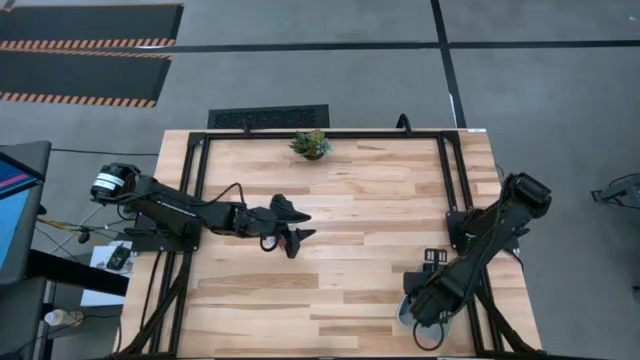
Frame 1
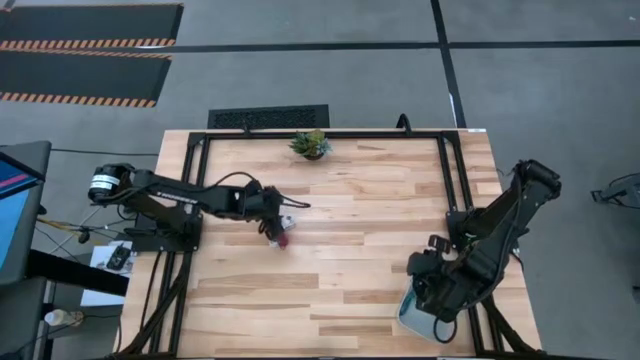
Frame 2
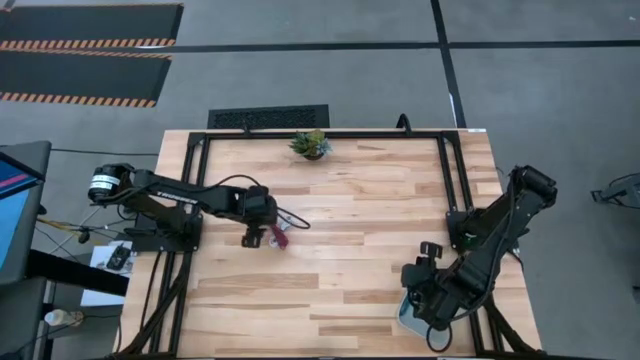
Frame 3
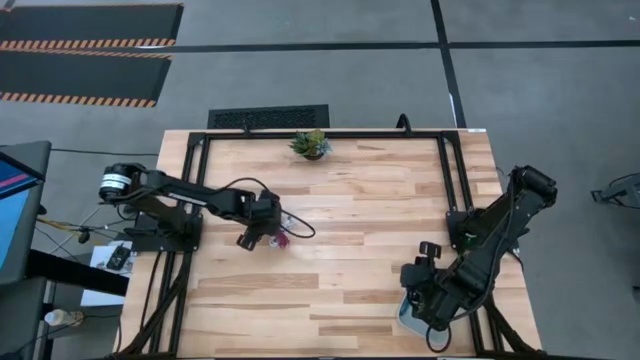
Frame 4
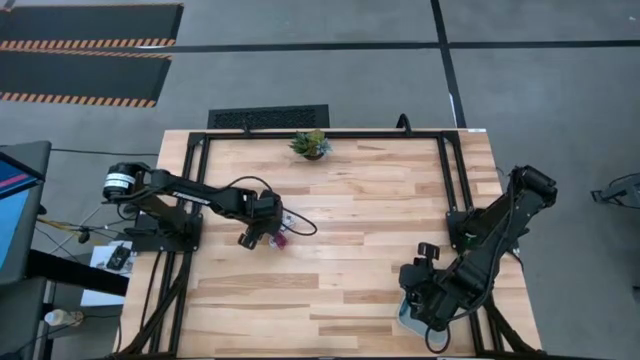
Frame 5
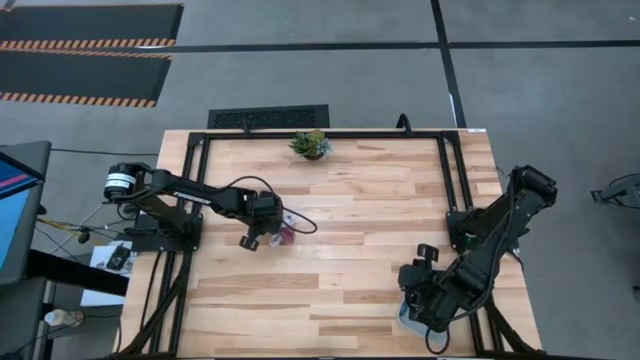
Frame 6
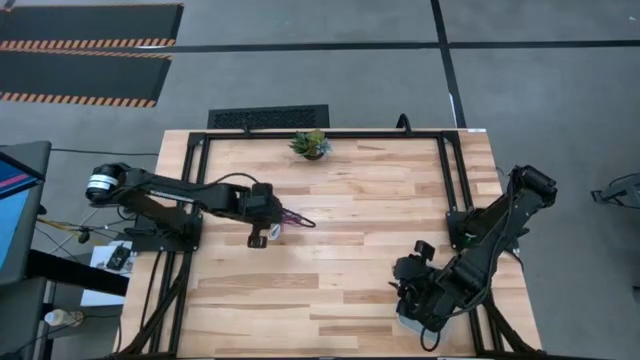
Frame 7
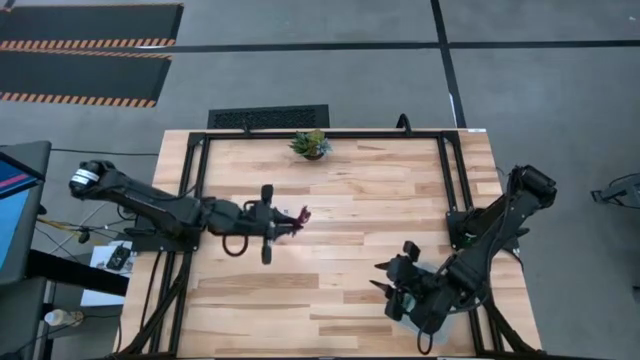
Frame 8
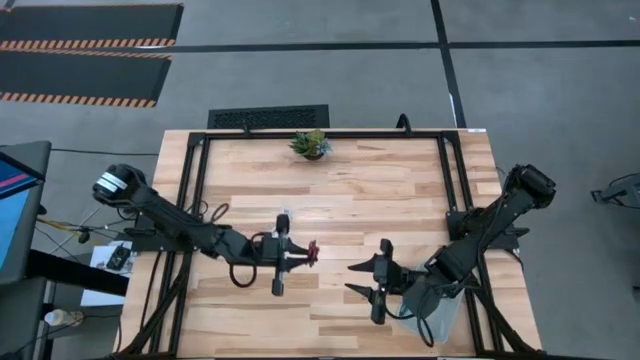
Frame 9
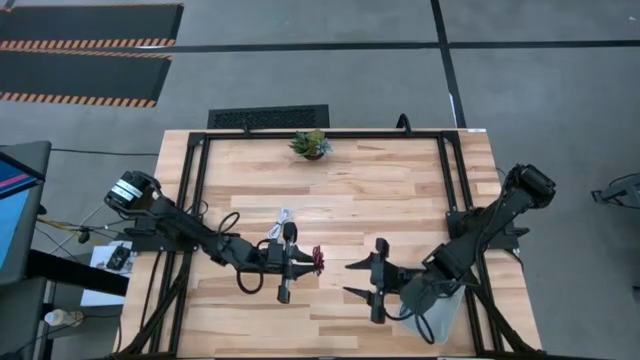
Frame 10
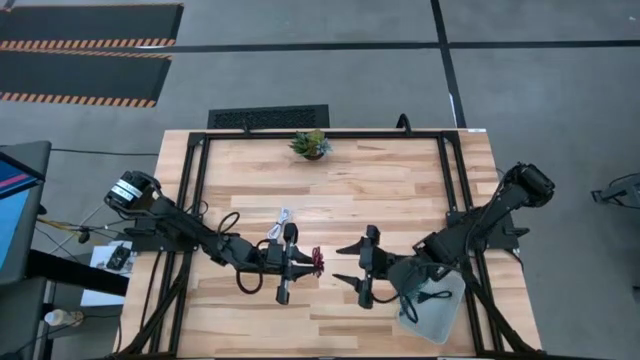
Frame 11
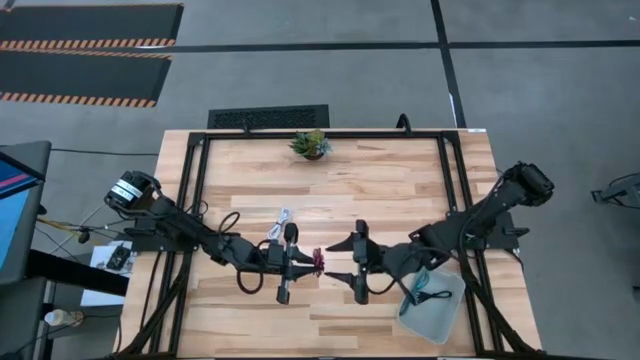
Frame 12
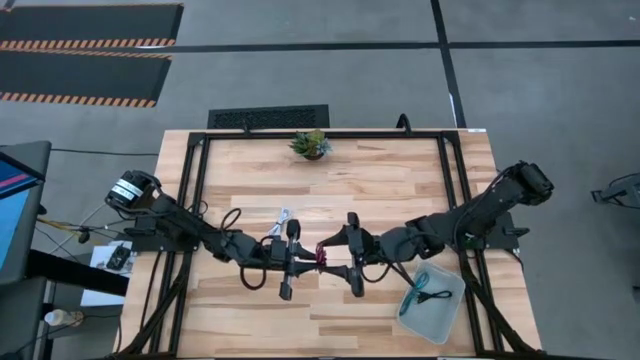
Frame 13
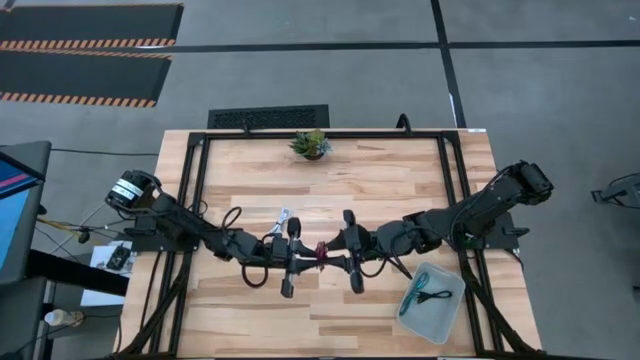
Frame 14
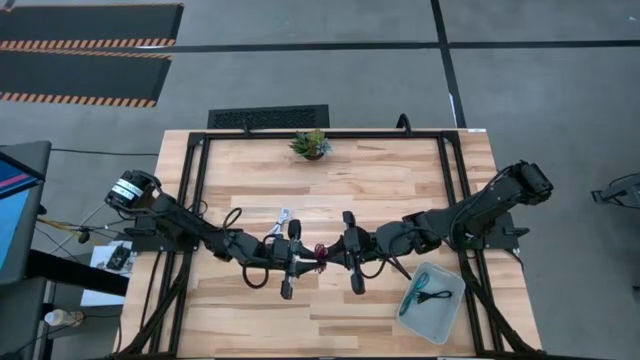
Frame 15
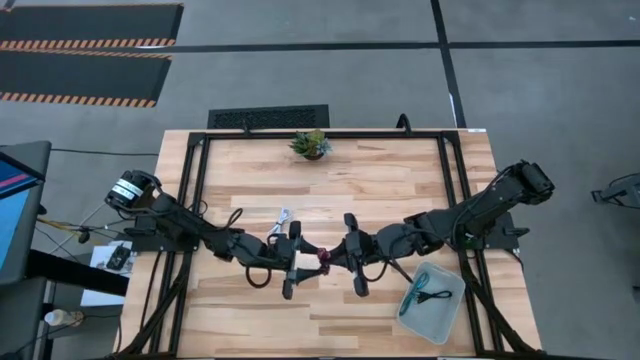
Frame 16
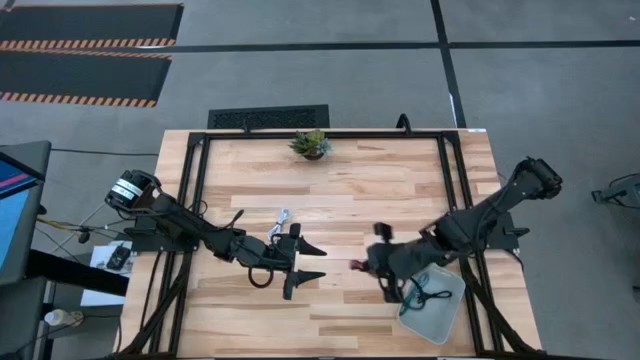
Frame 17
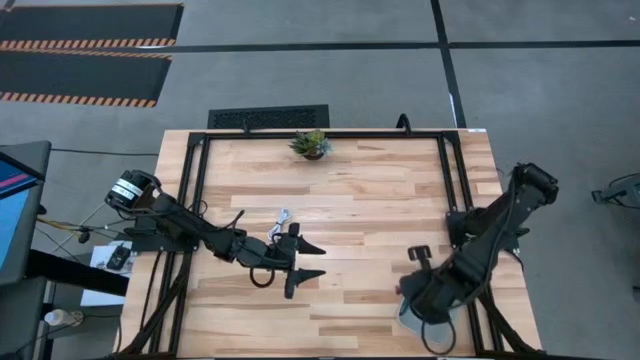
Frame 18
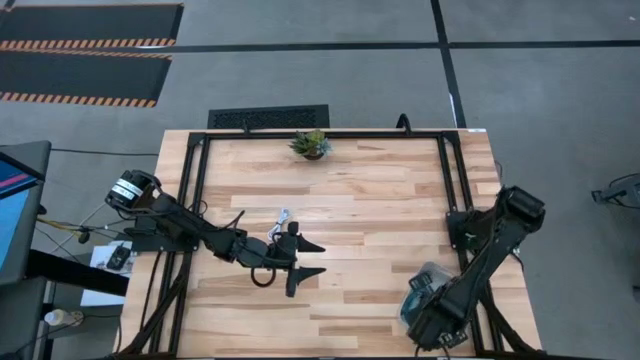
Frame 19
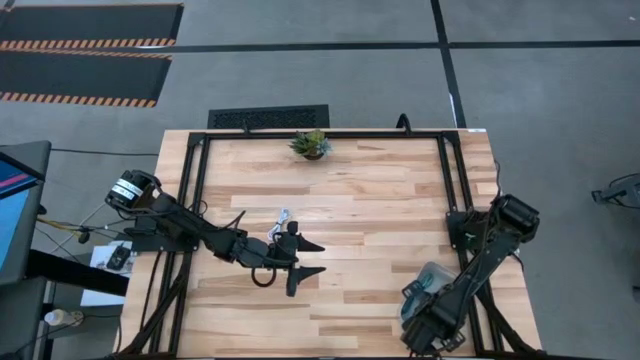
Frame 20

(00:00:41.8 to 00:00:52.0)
Task: Pick and place USB-C Cables
Put the pink charger cable into the white bin

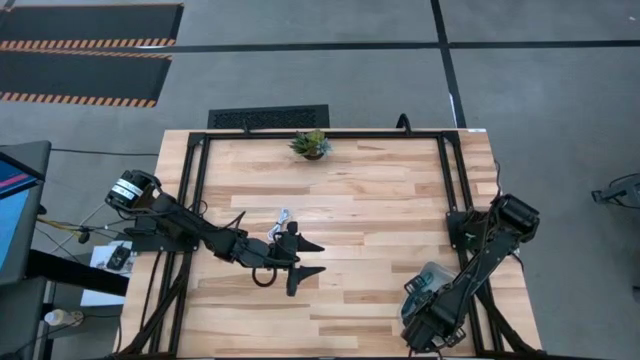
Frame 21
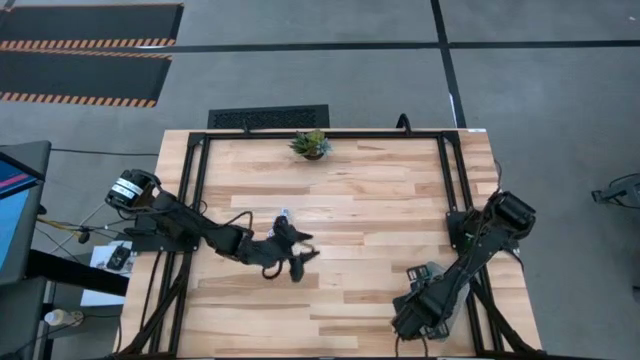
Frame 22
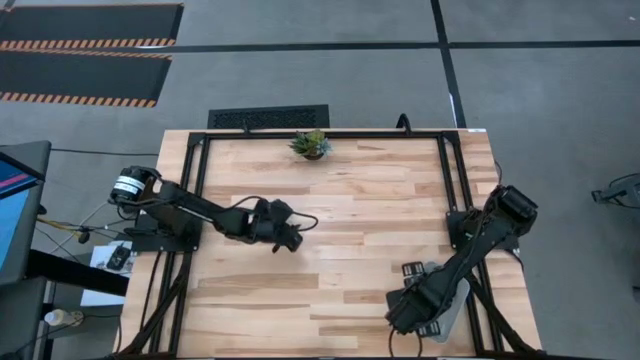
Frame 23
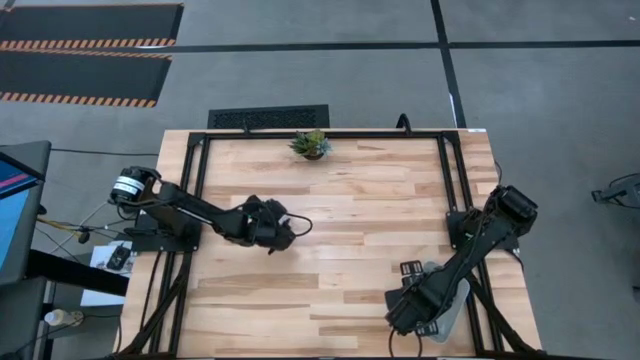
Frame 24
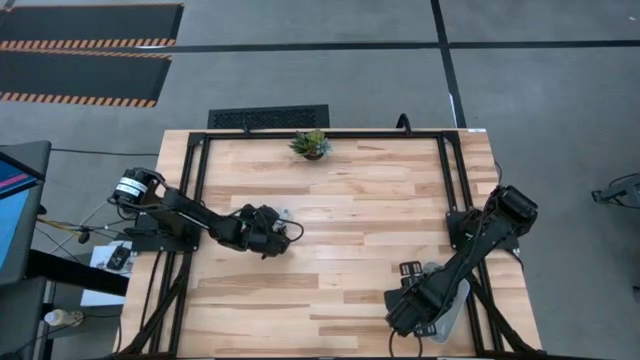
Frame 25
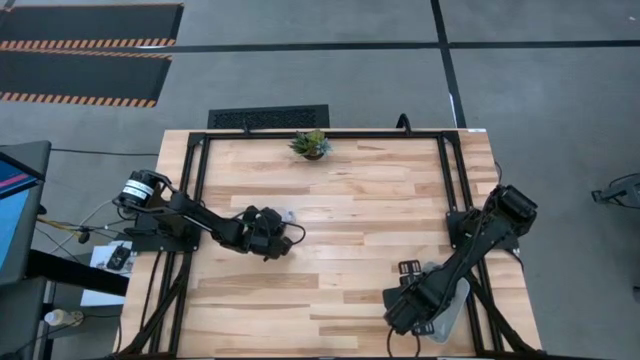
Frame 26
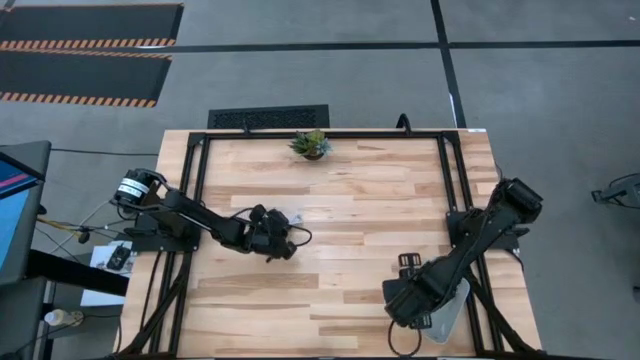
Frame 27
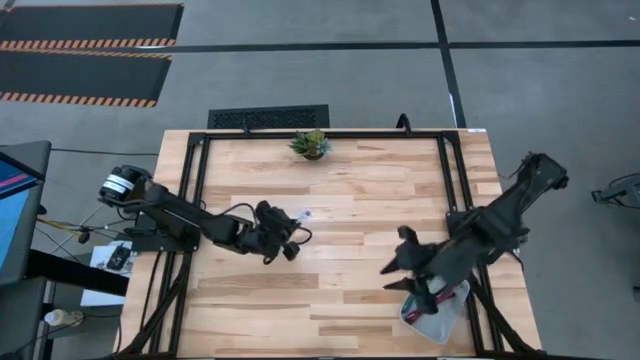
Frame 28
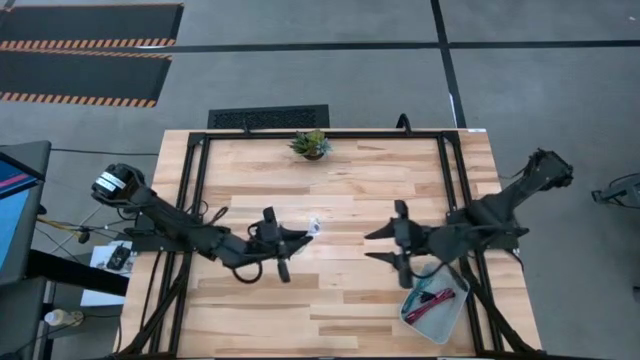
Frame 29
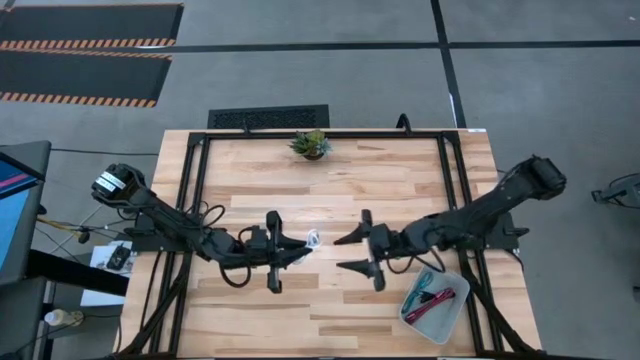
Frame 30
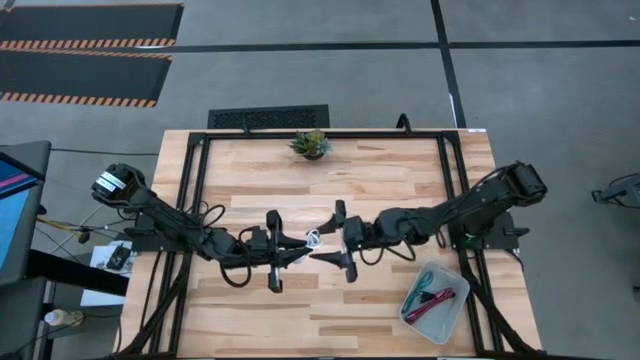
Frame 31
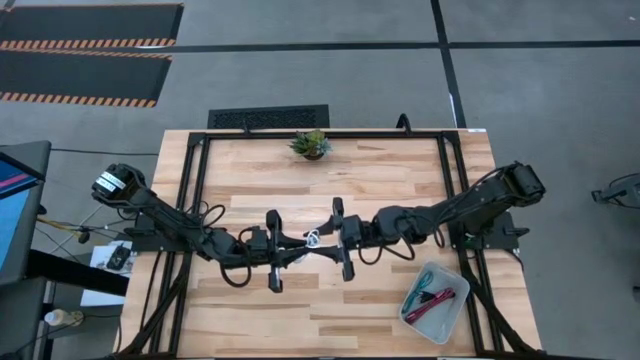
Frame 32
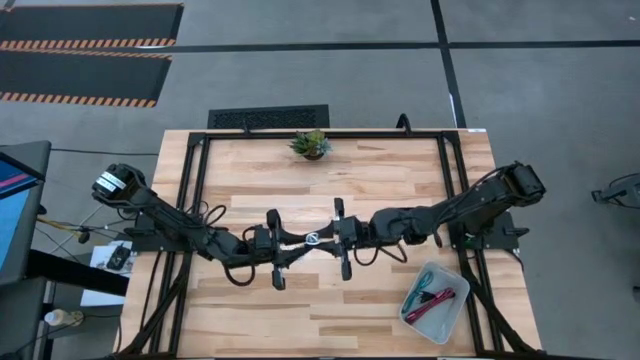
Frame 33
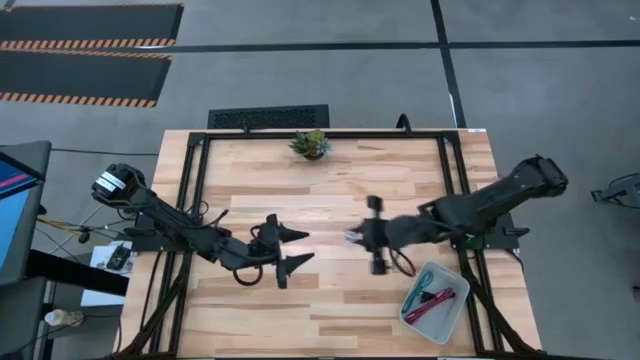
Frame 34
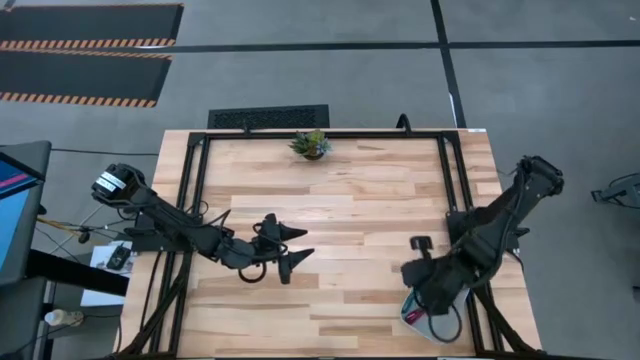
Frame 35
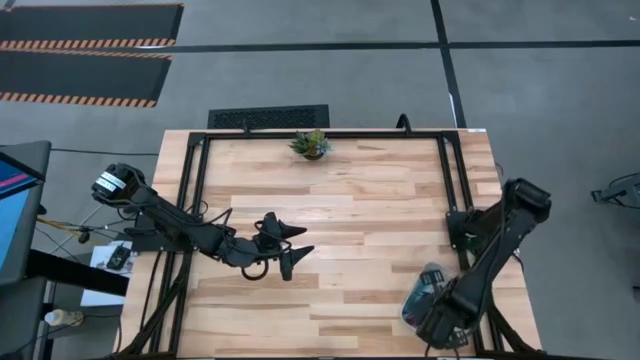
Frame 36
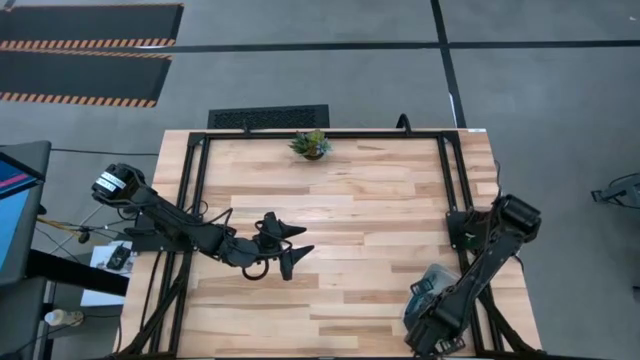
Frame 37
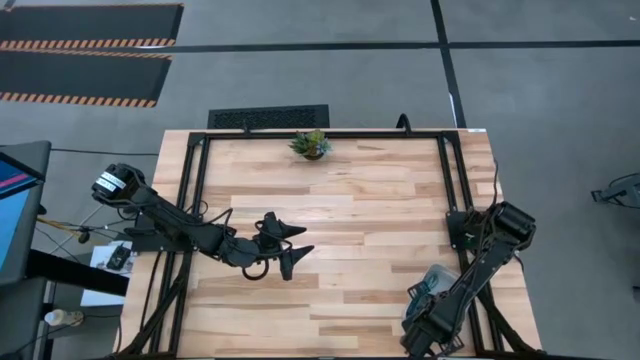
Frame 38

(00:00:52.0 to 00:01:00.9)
Put the white charger cable into the white bin
